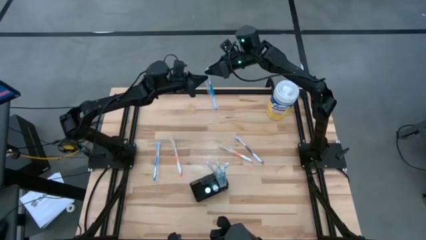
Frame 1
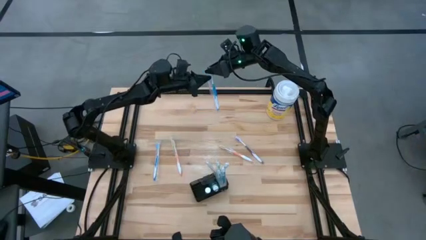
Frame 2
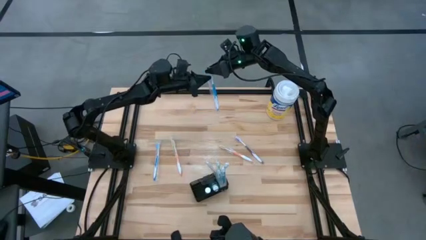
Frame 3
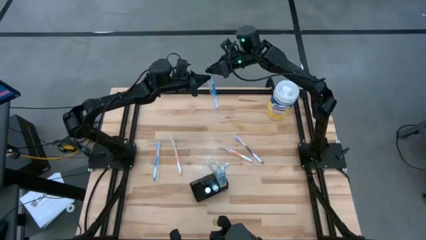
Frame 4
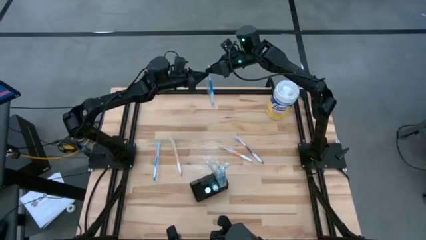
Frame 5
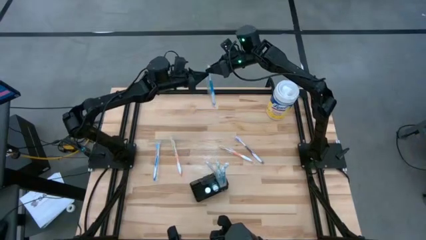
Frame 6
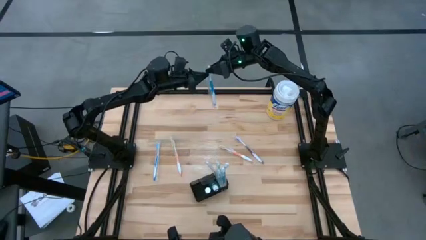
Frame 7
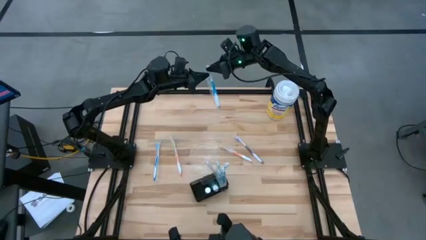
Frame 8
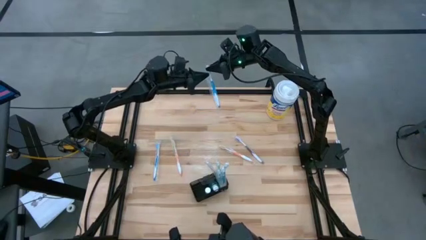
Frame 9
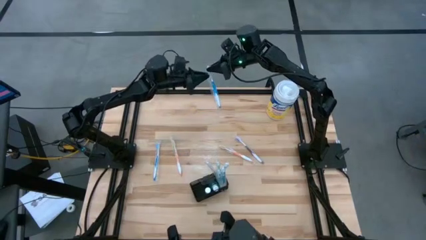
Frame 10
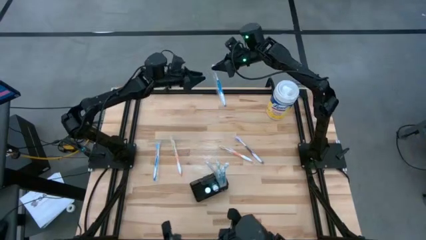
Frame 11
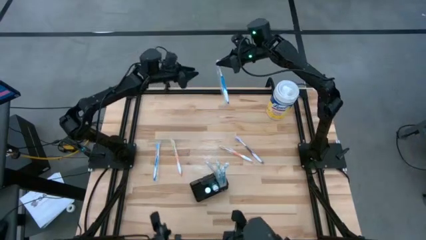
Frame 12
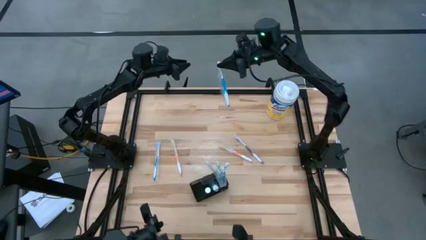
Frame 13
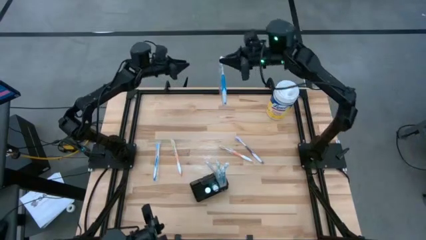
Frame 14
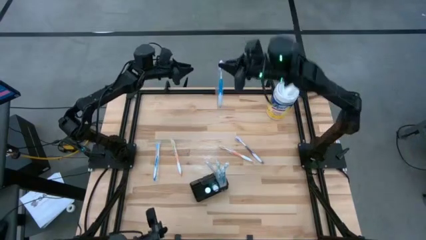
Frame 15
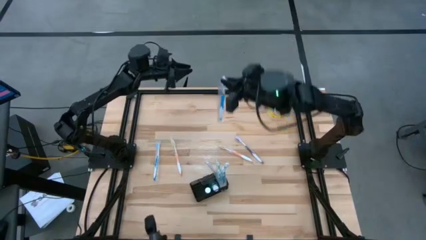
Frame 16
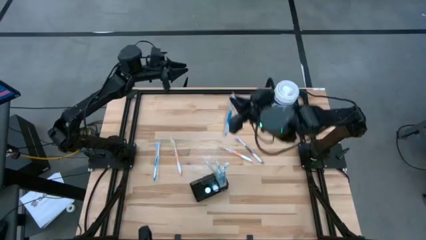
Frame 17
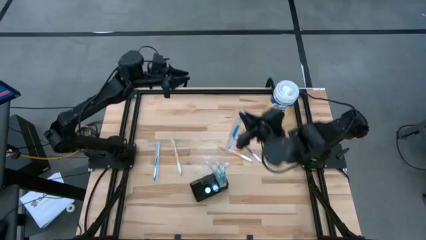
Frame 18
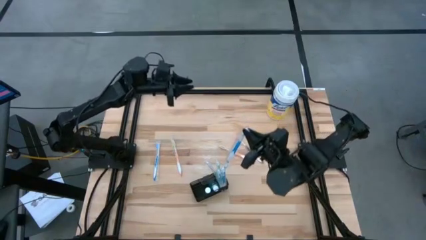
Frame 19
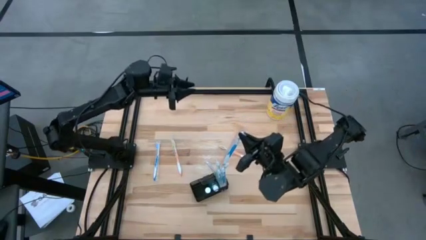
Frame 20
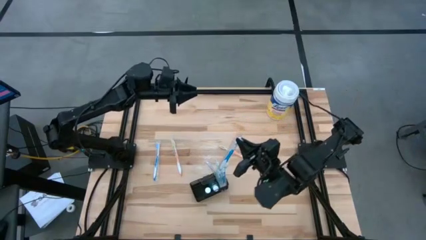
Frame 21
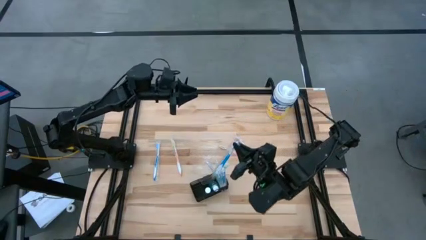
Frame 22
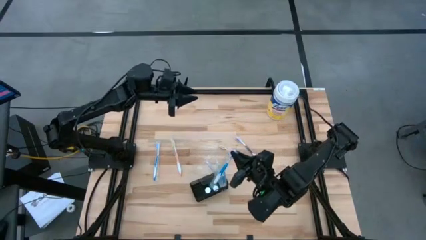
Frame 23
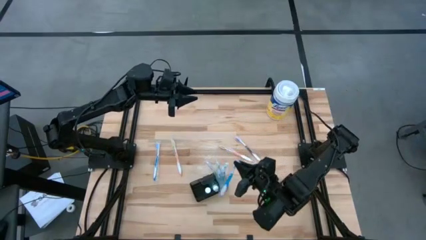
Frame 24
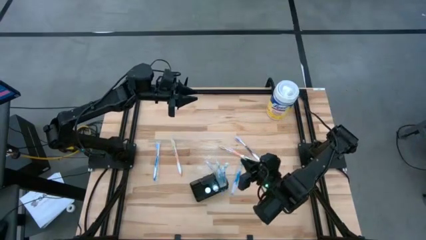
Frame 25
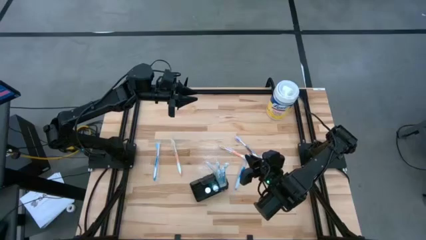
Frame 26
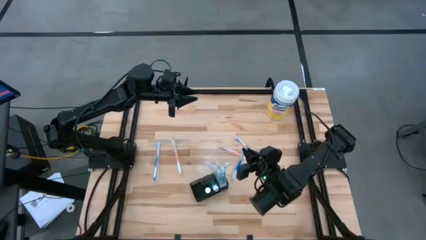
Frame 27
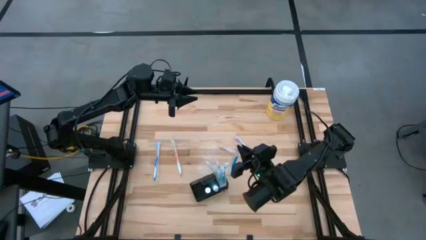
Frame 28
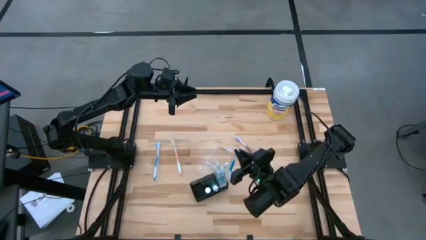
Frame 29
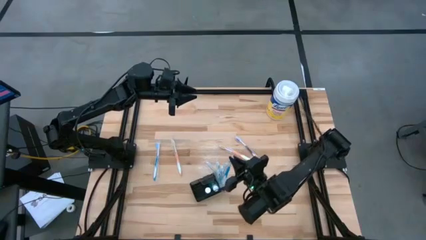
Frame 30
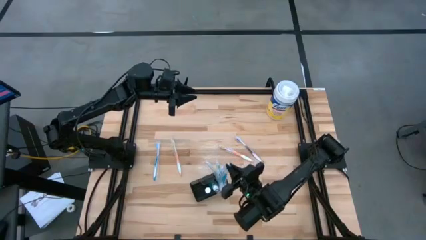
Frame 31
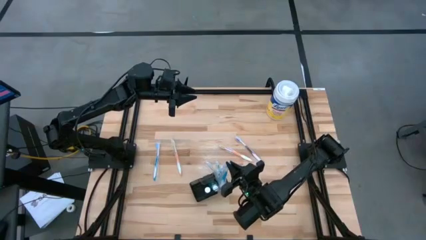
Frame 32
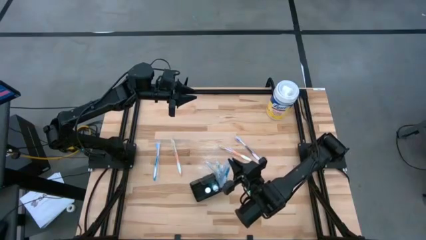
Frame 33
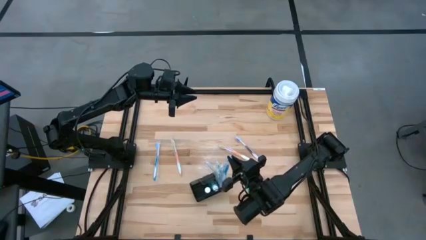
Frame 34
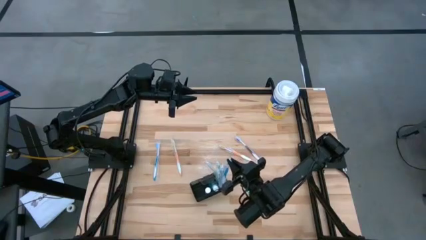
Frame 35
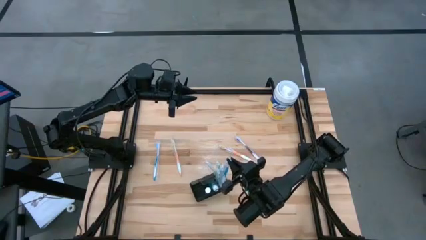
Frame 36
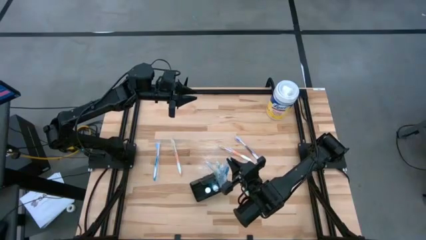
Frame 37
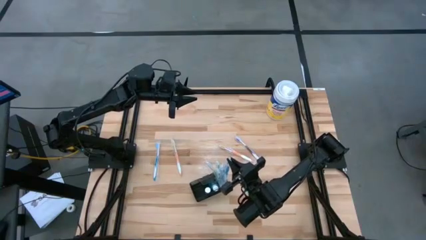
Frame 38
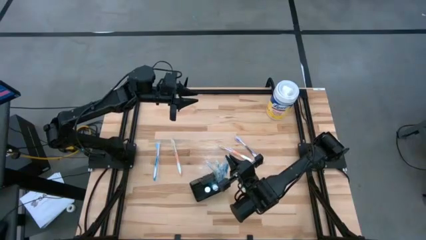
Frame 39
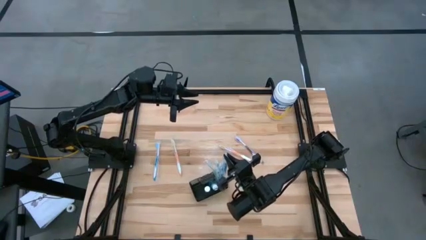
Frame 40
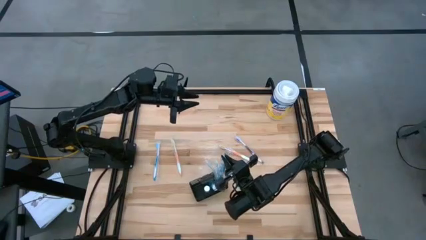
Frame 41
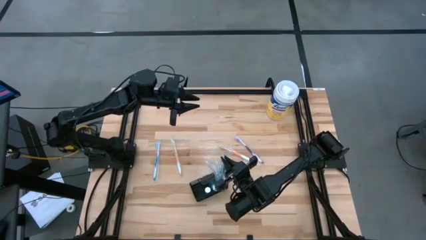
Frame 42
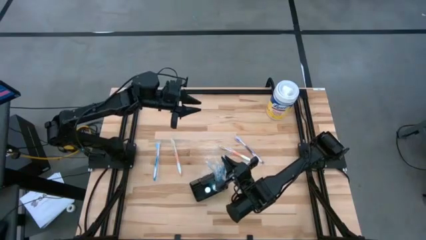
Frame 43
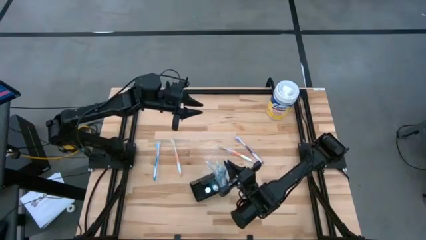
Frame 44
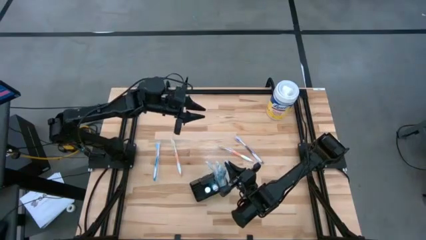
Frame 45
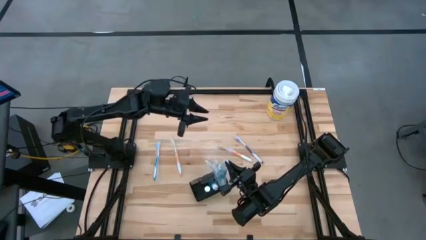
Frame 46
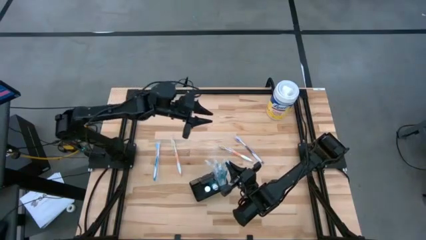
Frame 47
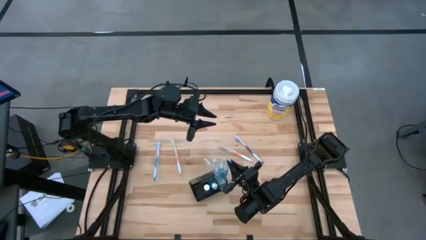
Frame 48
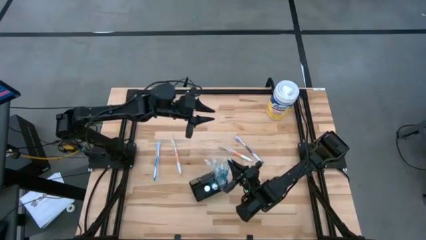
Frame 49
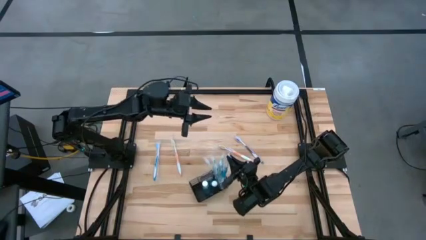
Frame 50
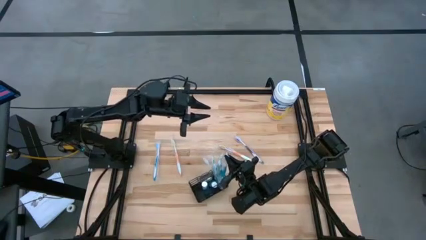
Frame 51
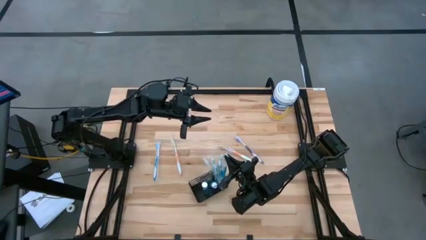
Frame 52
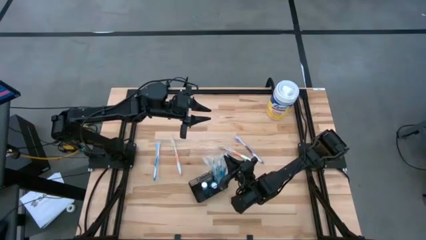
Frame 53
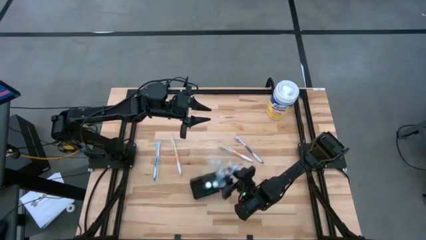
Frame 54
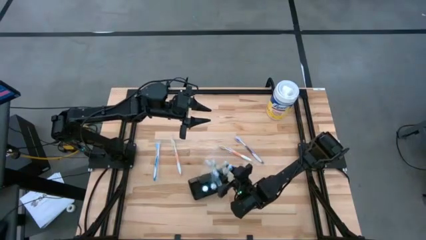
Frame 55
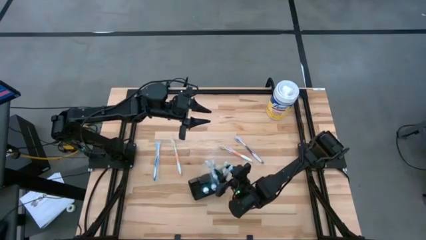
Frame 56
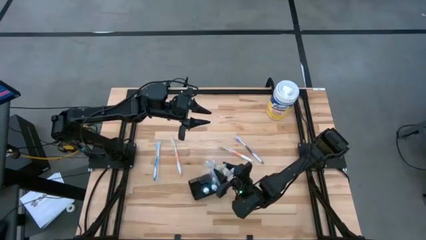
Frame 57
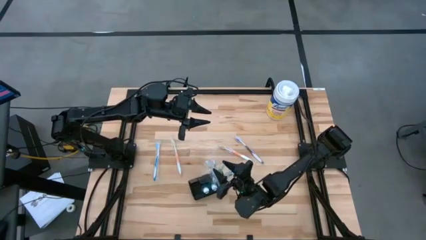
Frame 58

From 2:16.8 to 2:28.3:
Task: Pick & Place toothbrushing station
Put the blue toothbrush into the mesh organizer

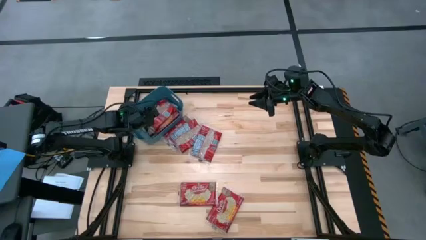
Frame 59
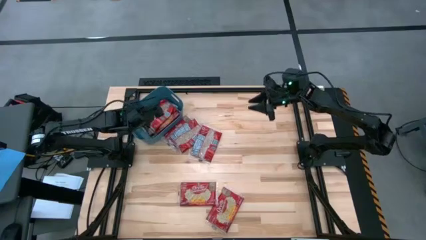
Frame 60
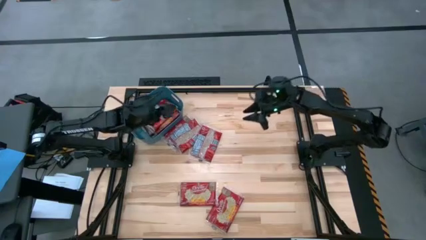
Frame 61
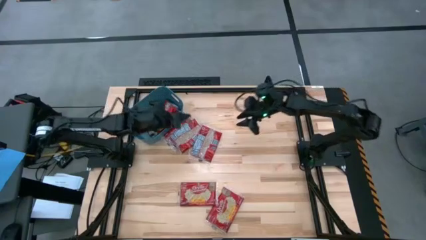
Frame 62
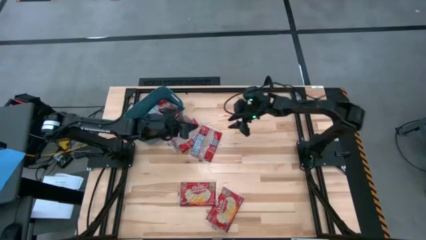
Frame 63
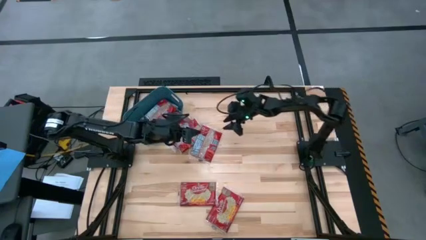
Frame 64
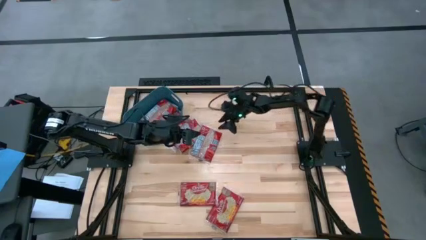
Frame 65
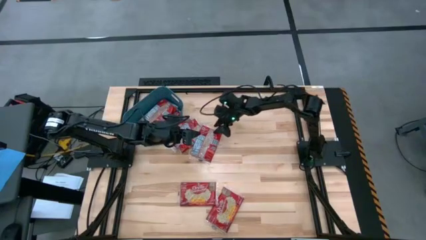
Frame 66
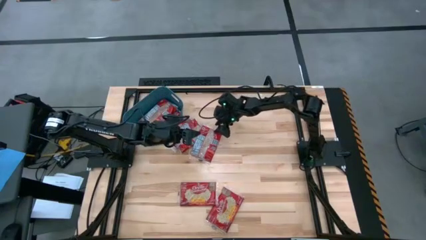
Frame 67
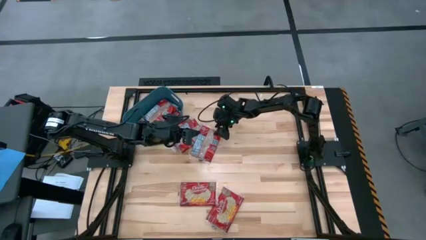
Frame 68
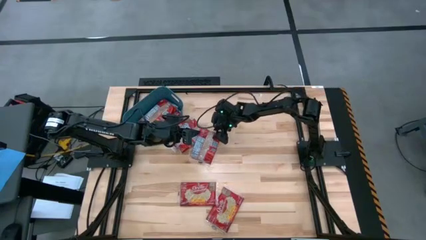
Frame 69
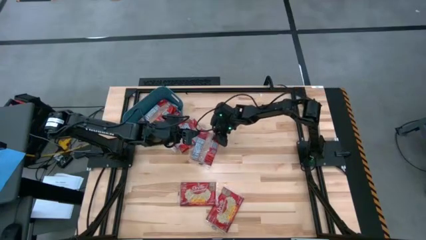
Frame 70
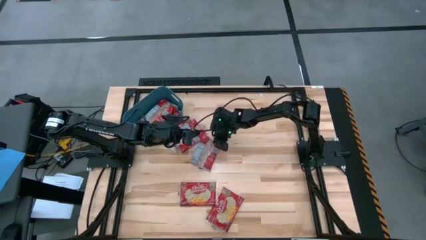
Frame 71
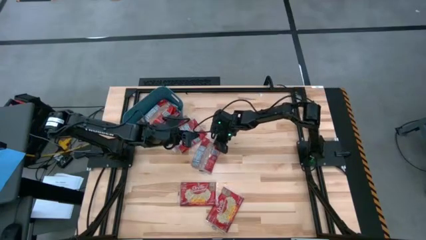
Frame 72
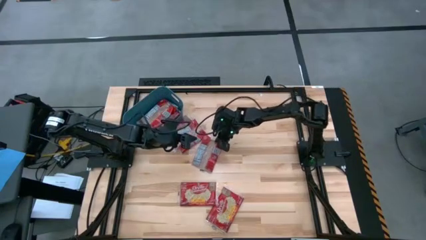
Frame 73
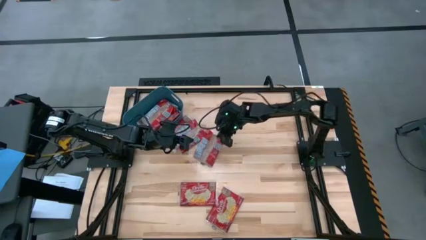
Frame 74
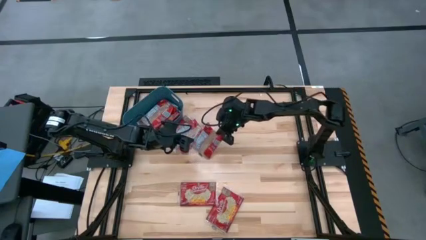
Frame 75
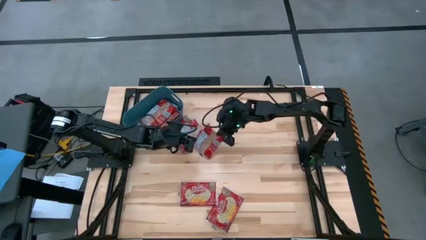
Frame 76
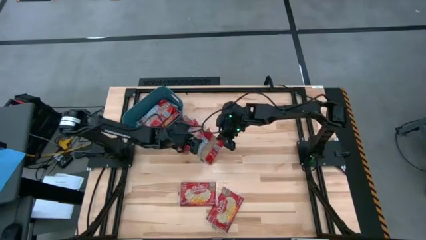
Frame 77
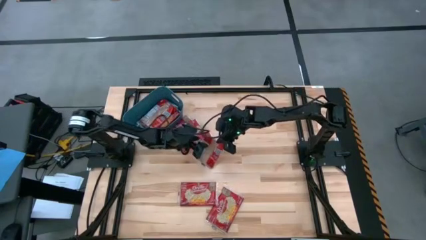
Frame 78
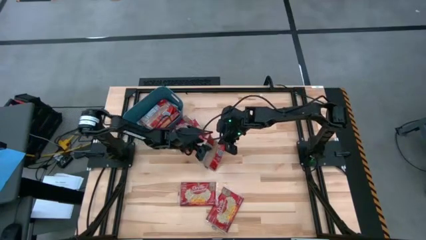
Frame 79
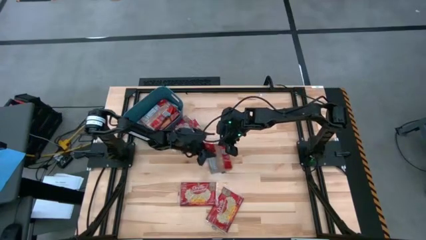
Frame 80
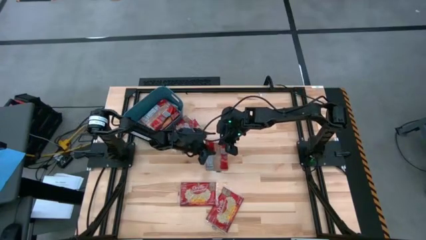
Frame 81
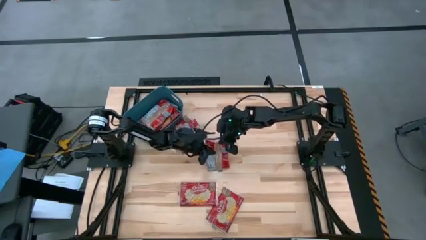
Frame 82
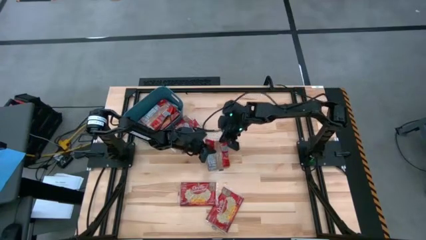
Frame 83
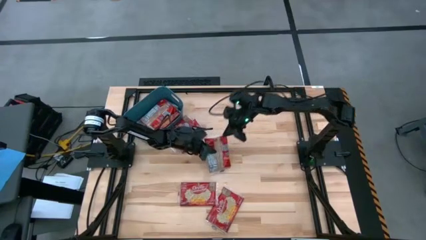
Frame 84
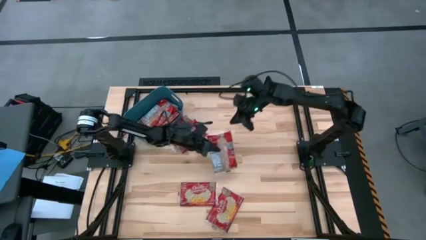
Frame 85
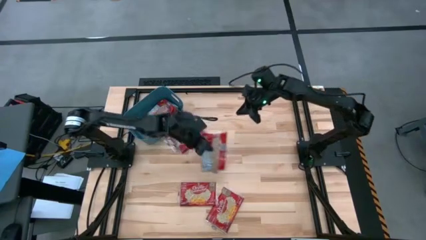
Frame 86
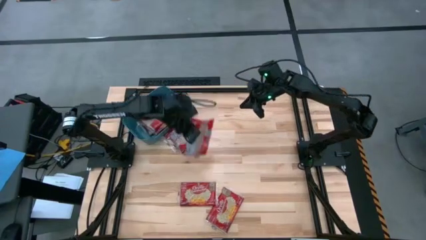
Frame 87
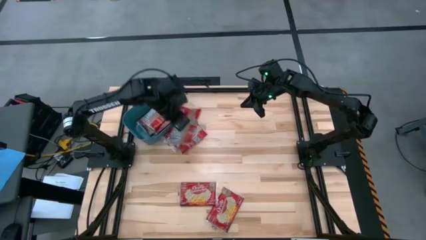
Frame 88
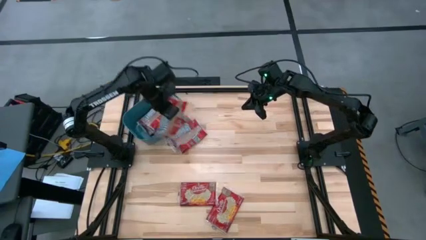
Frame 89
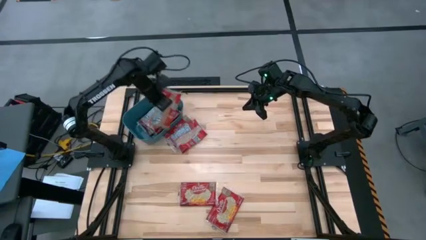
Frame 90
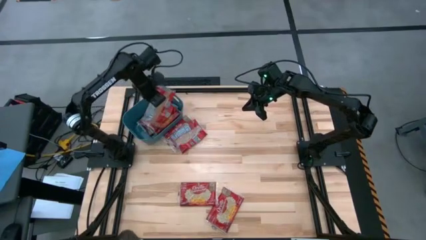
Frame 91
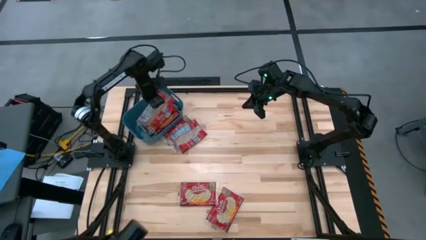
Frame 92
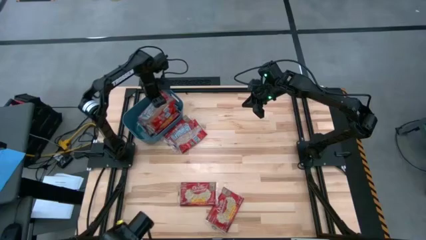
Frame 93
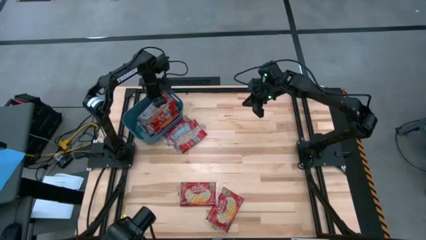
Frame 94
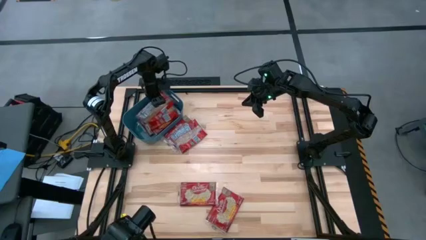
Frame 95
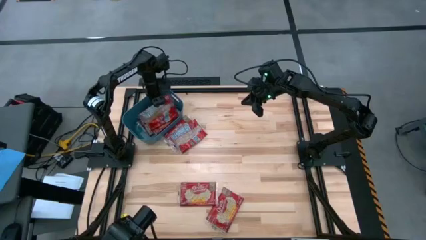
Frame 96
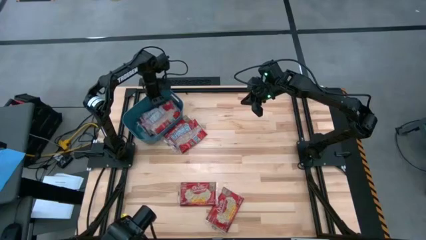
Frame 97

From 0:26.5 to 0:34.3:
Task: Sort popcorn bags into baskets
Put the popcorn bag into the green bin
